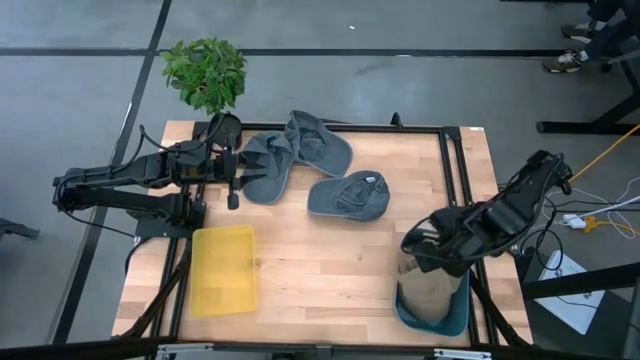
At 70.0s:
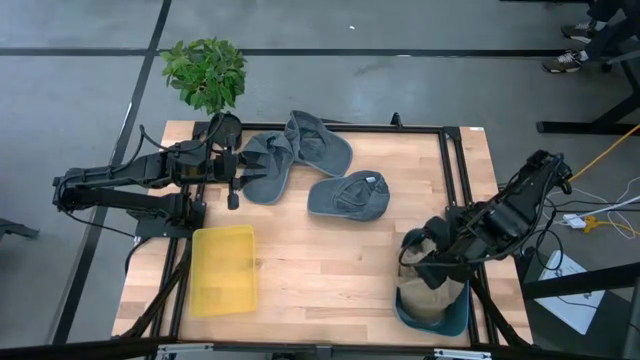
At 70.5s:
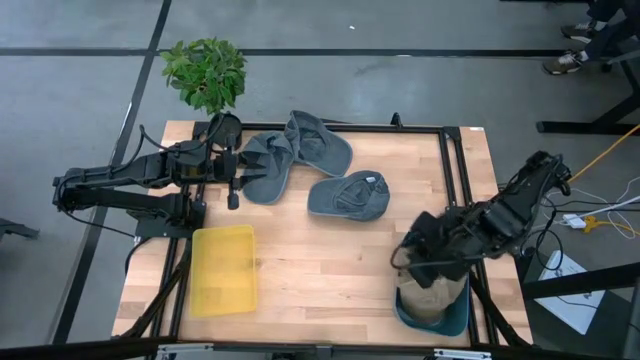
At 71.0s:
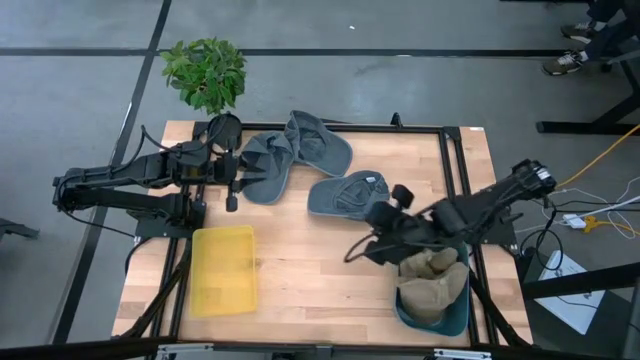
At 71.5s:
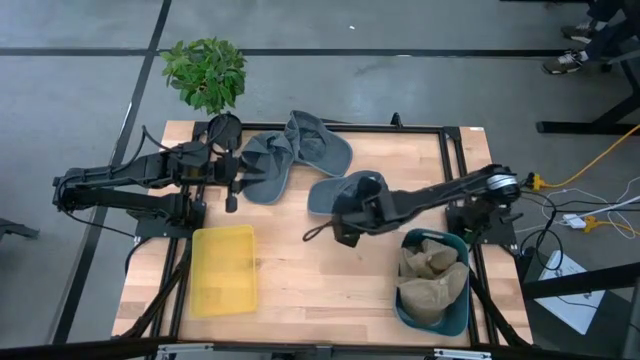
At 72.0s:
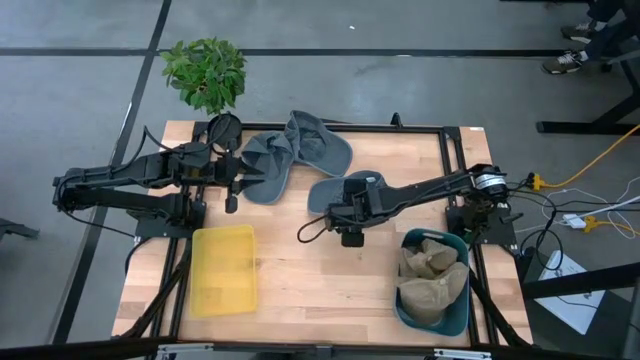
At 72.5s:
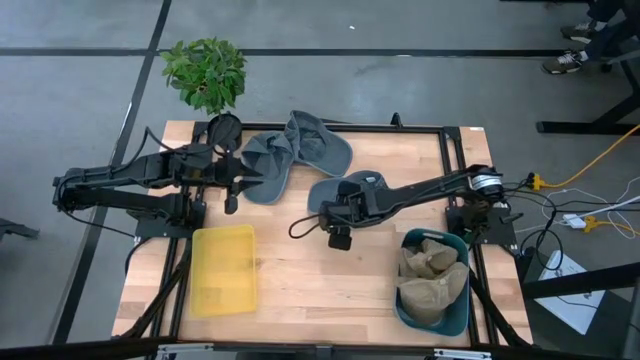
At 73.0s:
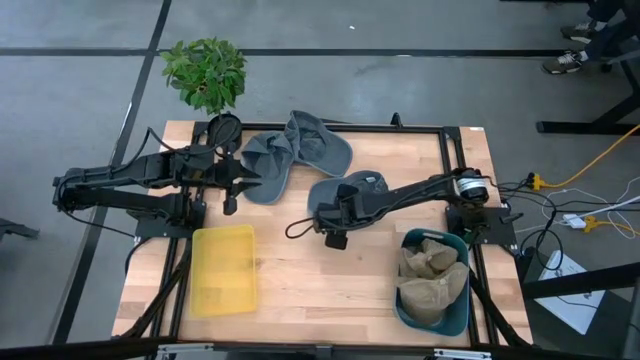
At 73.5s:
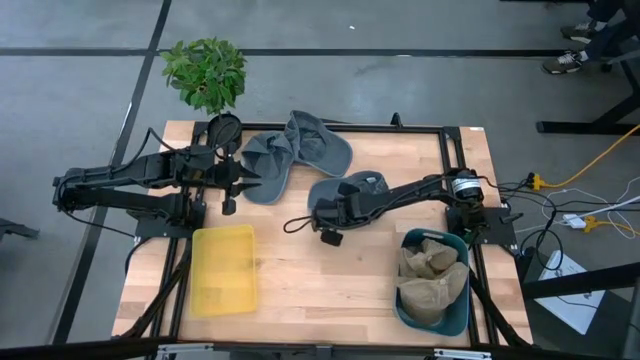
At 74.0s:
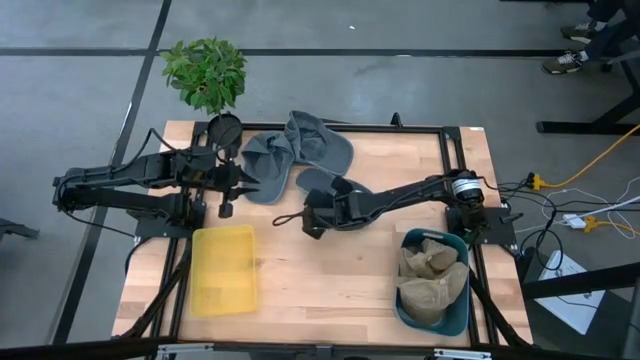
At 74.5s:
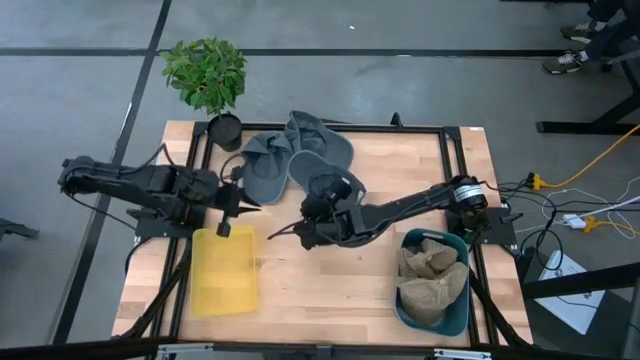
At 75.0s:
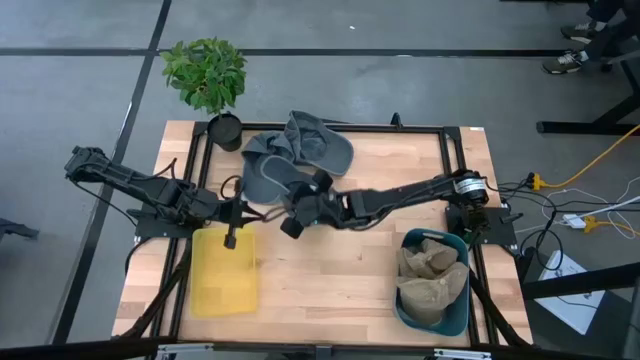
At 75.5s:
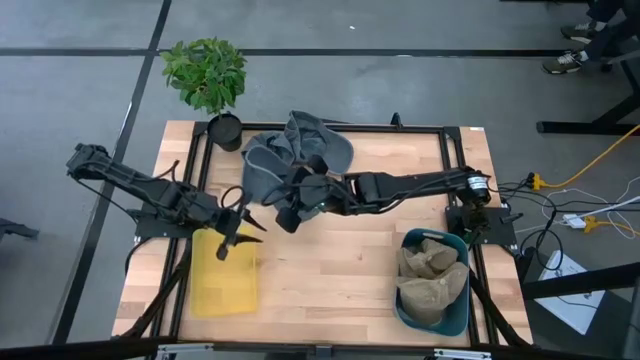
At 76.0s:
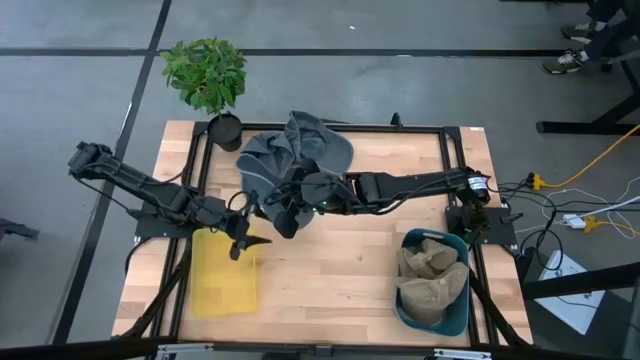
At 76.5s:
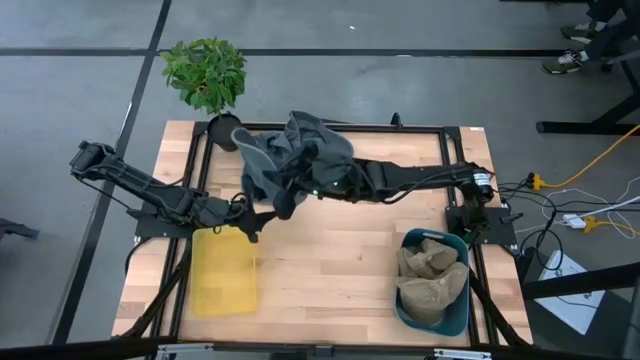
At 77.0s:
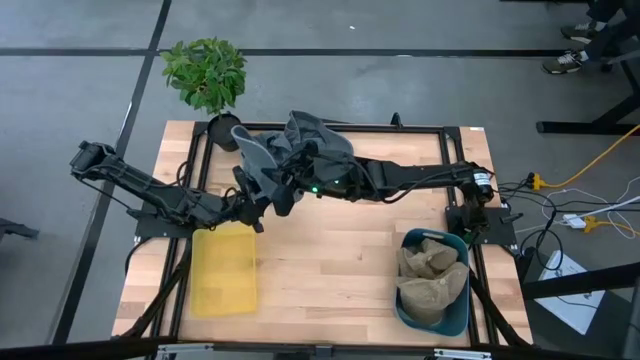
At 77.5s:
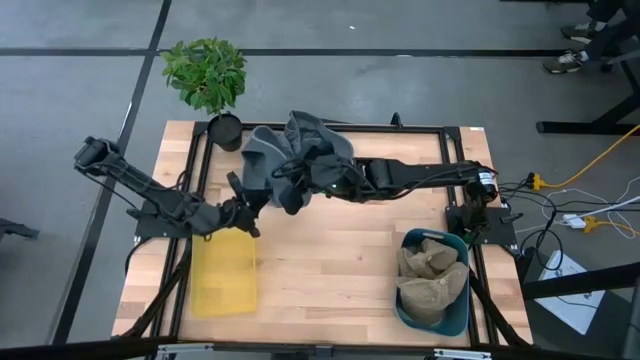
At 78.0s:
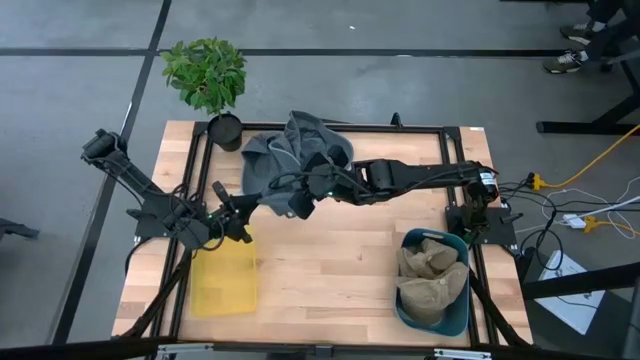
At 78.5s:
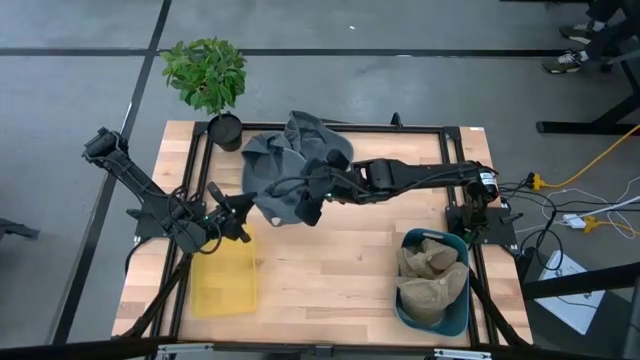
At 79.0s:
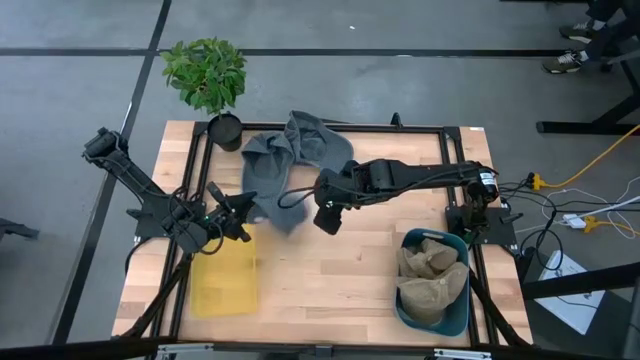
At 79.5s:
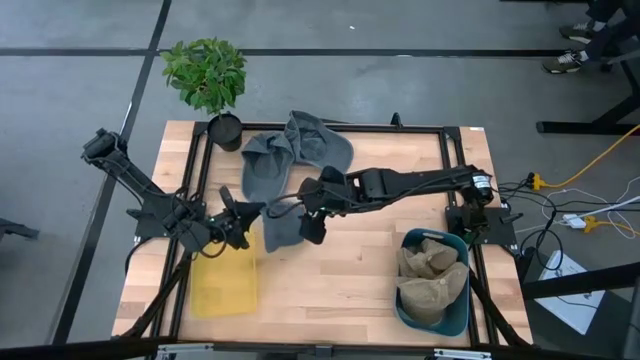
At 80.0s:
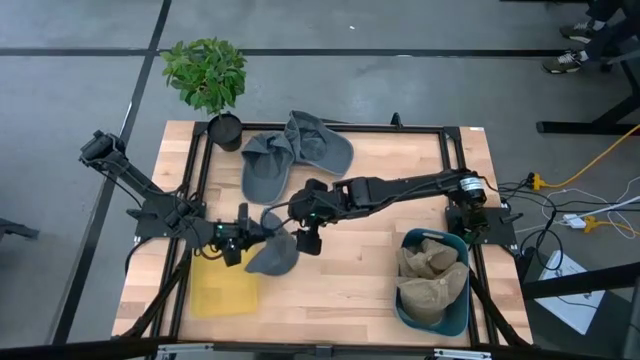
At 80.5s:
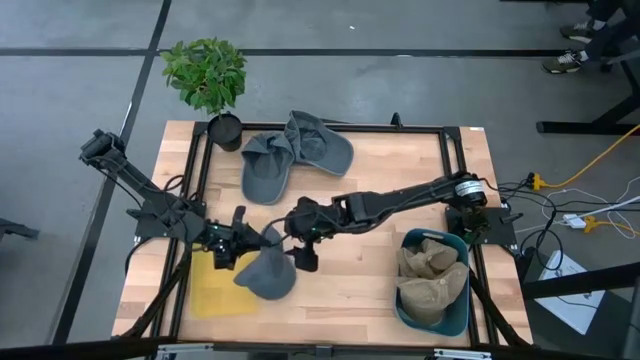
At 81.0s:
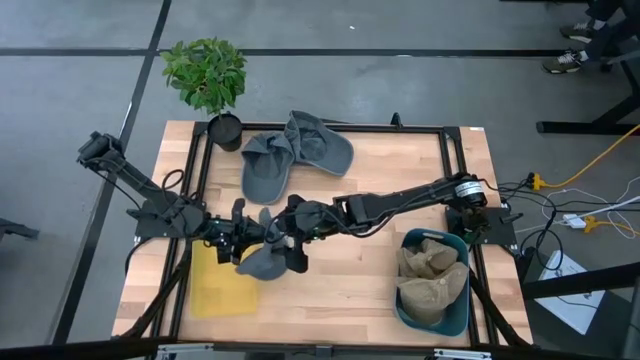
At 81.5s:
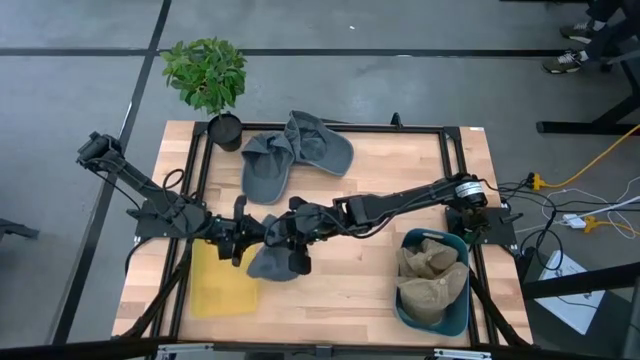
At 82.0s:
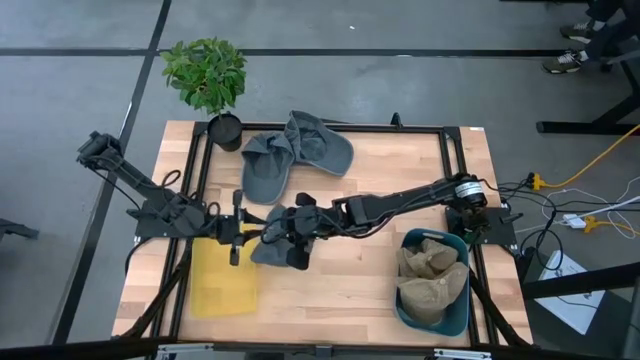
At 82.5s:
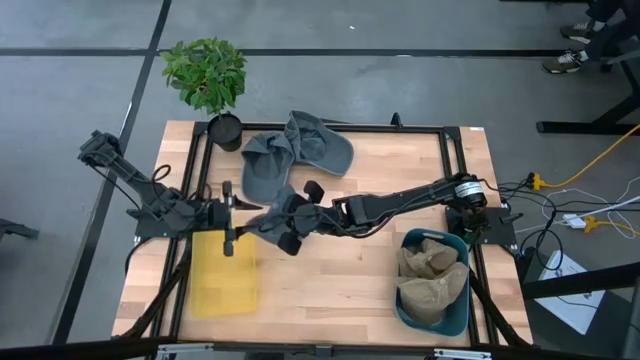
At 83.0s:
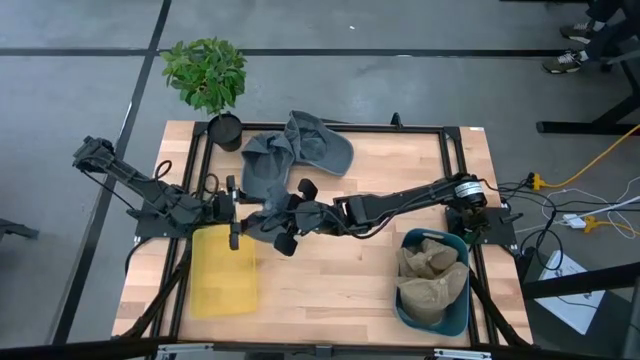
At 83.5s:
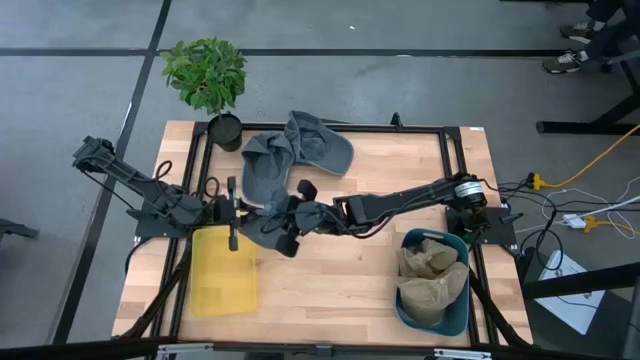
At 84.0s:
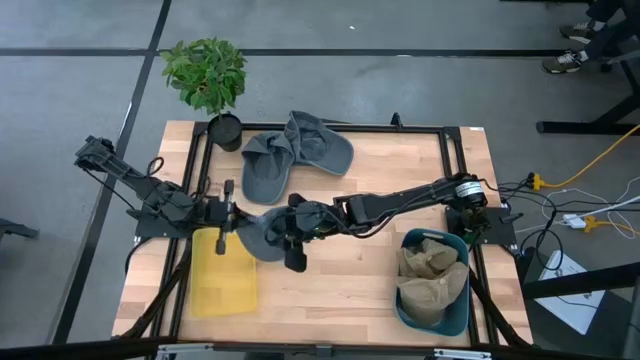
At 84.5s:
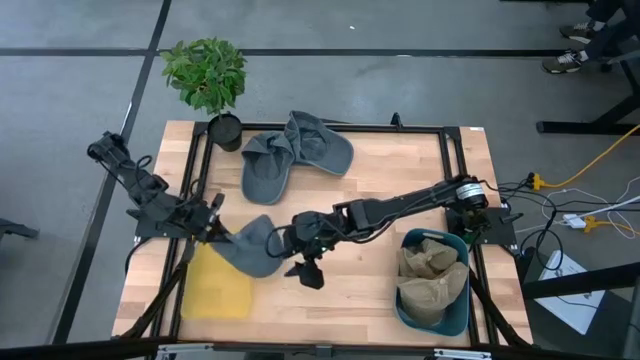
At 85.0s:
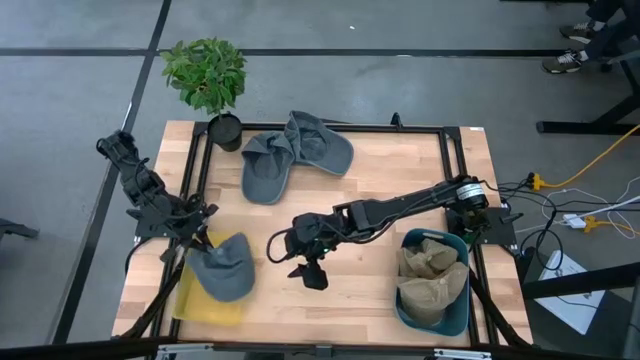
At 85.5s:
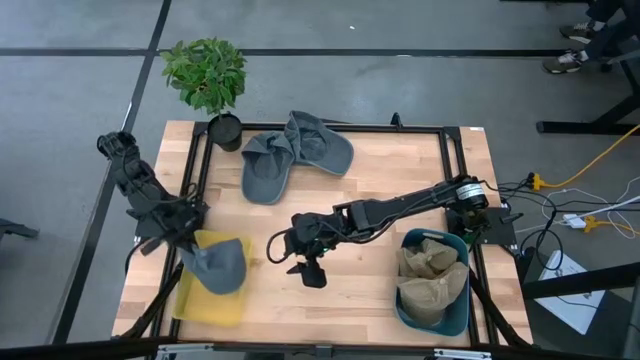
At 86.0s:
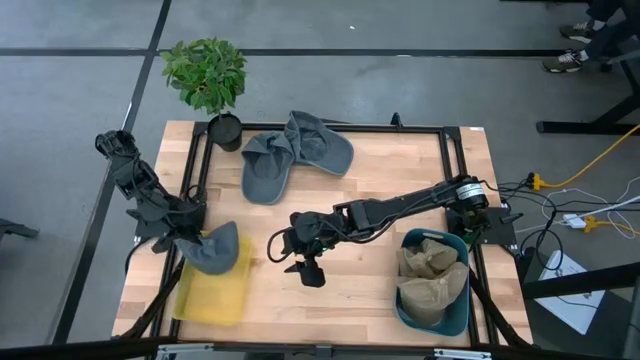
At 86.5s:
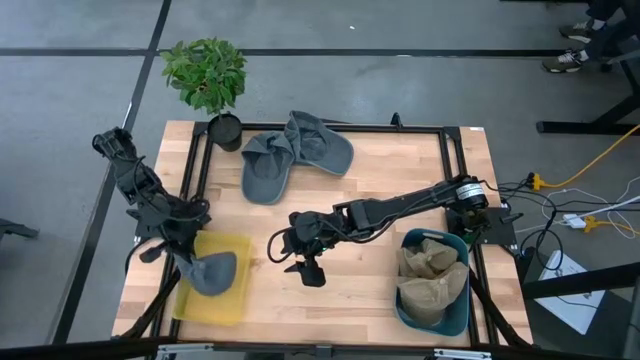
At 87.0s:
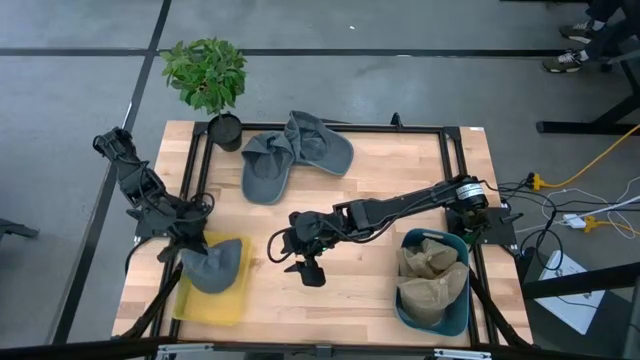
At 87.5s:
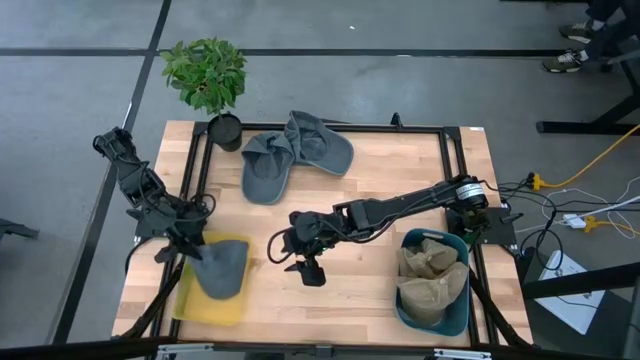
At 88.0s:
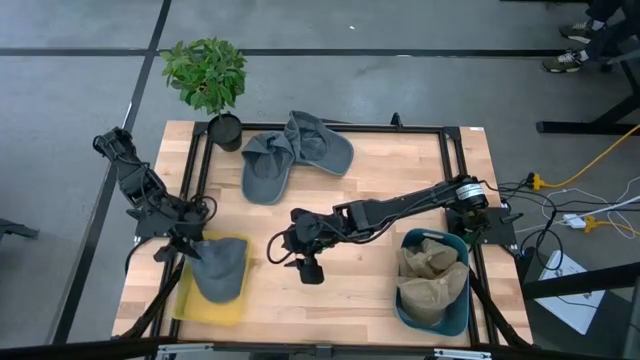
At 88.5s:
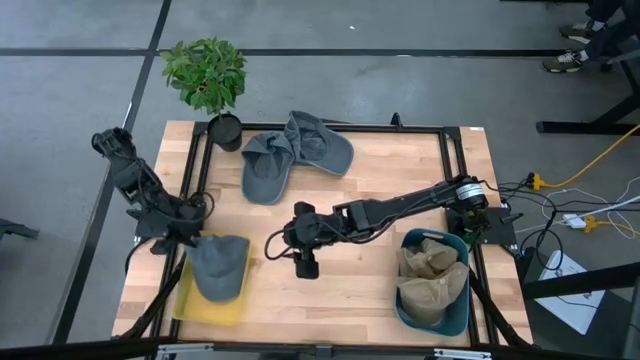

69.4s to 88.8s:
Task: Pick & Place hat
Put the bottom blue cap into the yellow bin

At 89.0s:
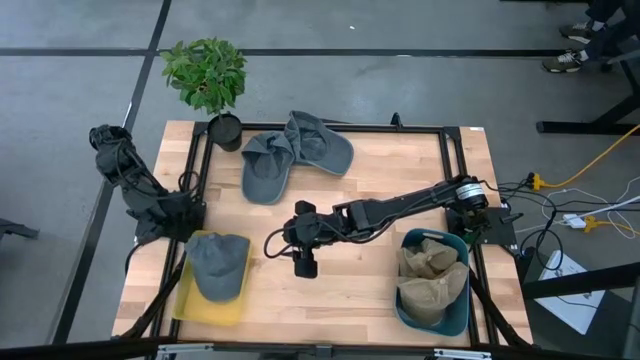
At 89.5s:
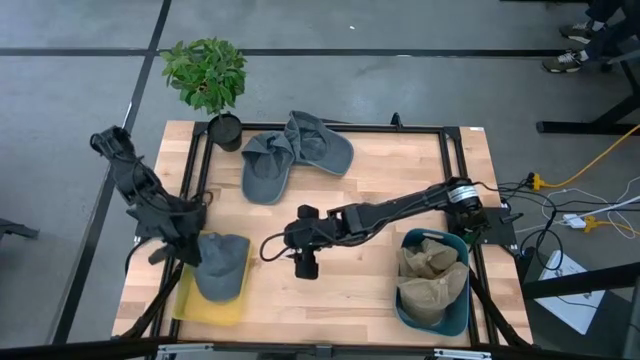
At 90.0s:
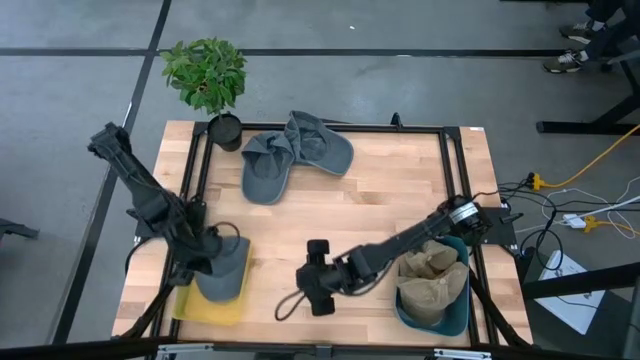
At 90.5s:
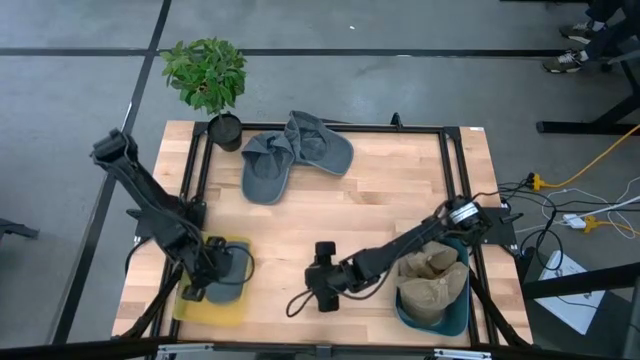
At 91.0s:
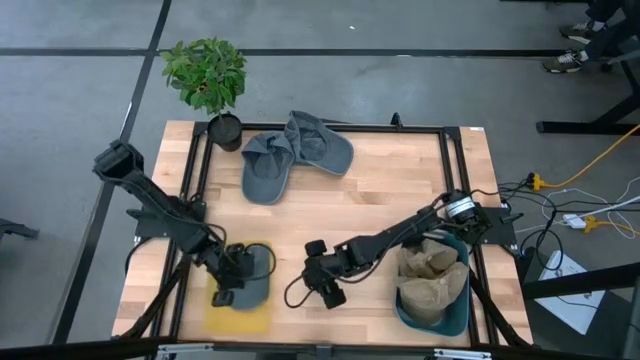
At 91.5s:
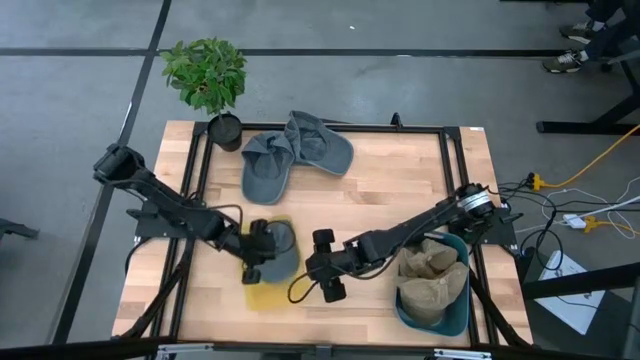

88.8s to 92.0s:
Move the yellow bin to the center of the table
